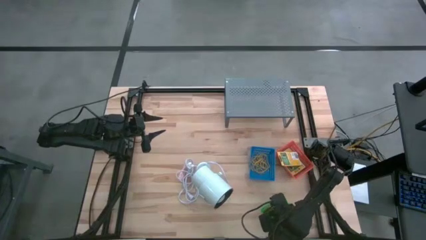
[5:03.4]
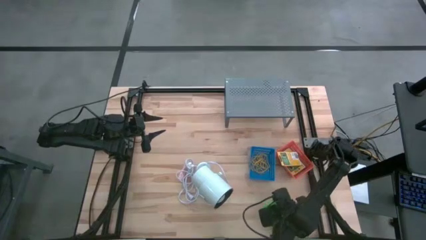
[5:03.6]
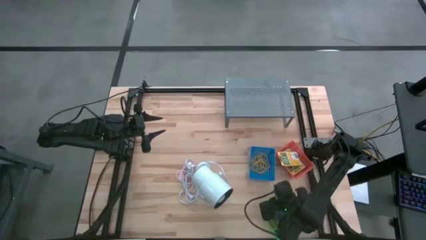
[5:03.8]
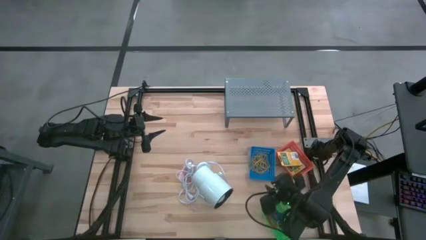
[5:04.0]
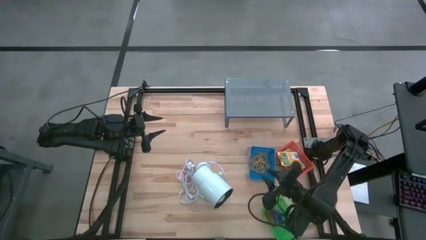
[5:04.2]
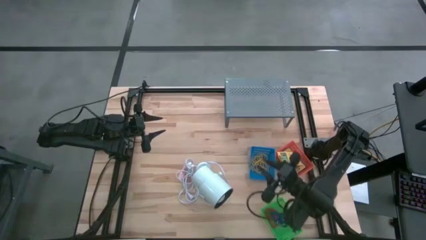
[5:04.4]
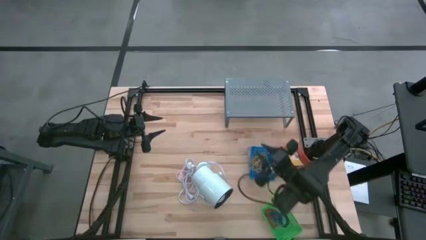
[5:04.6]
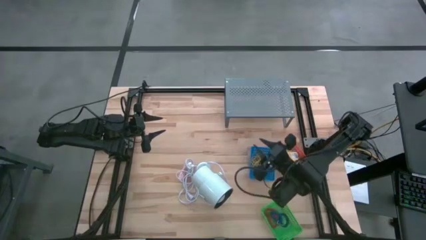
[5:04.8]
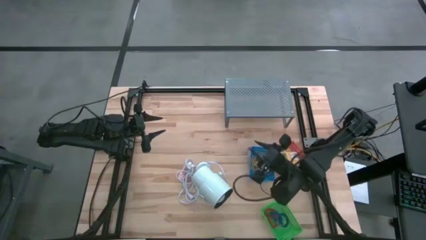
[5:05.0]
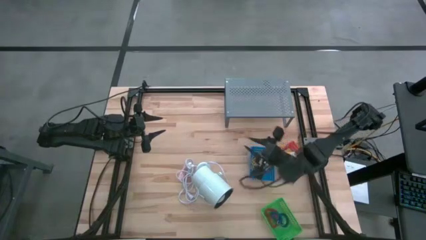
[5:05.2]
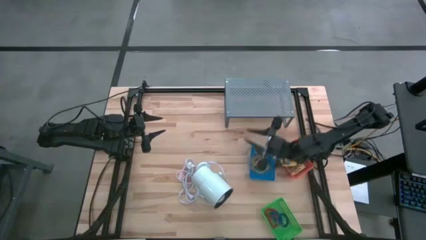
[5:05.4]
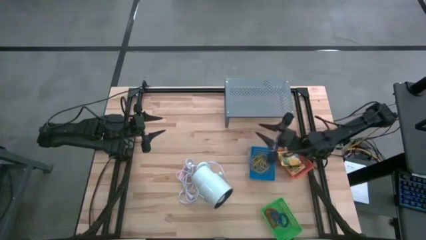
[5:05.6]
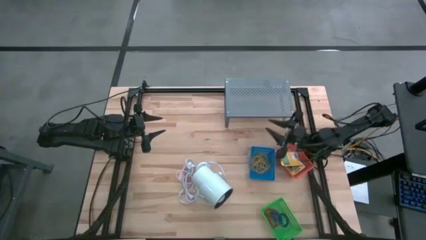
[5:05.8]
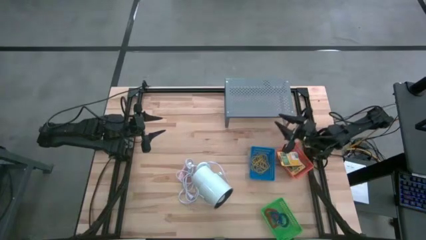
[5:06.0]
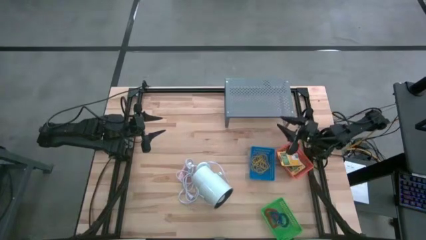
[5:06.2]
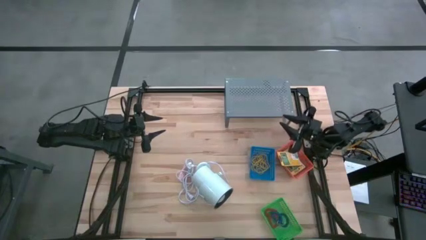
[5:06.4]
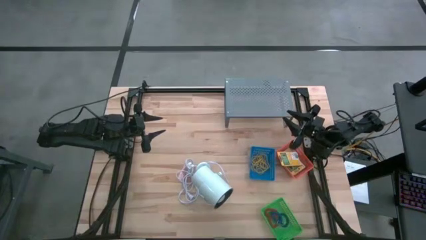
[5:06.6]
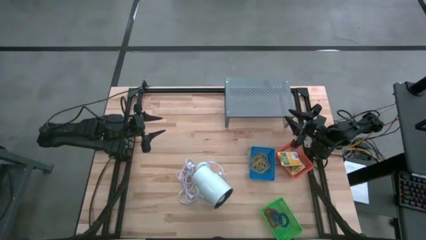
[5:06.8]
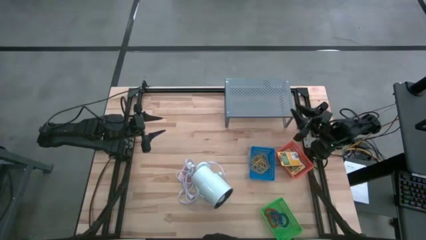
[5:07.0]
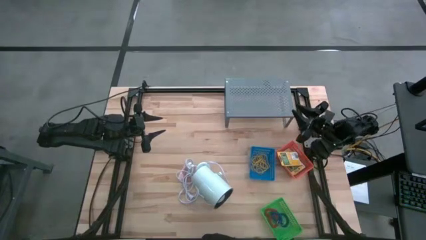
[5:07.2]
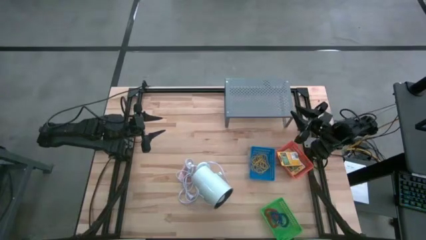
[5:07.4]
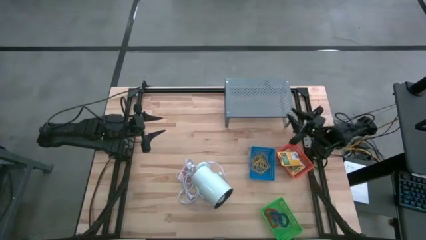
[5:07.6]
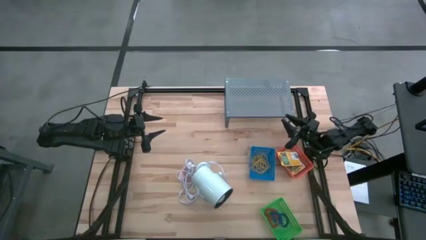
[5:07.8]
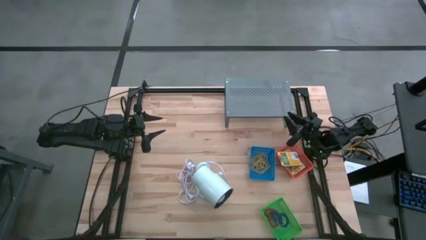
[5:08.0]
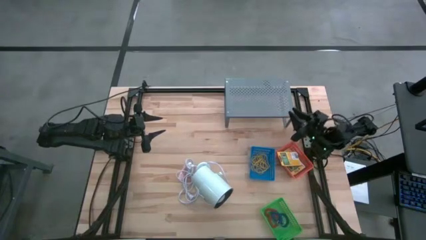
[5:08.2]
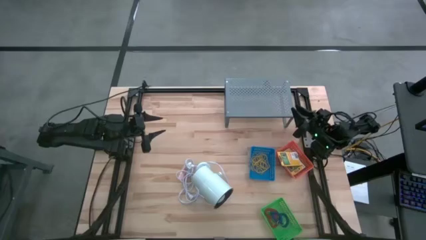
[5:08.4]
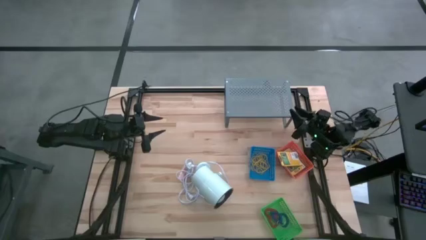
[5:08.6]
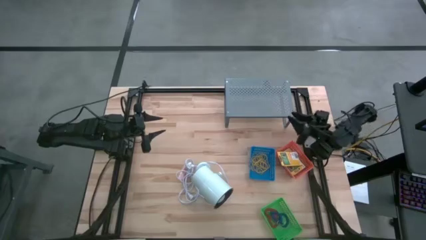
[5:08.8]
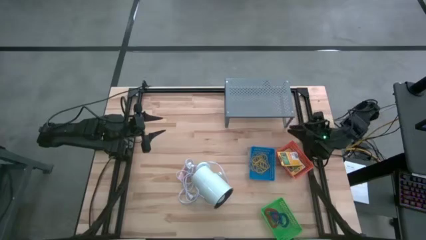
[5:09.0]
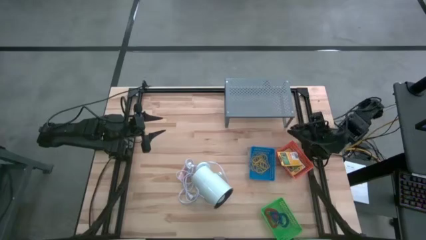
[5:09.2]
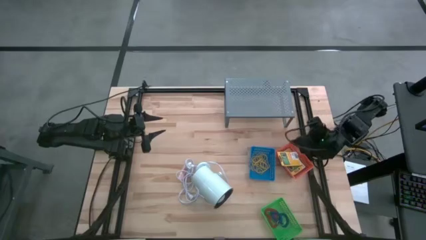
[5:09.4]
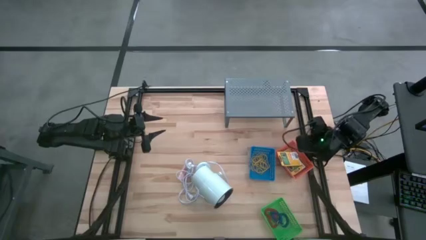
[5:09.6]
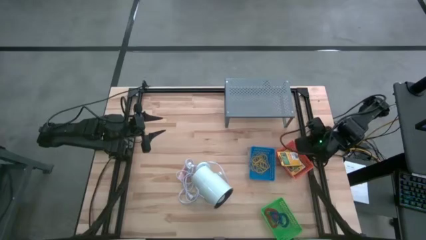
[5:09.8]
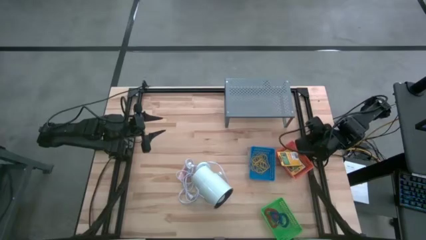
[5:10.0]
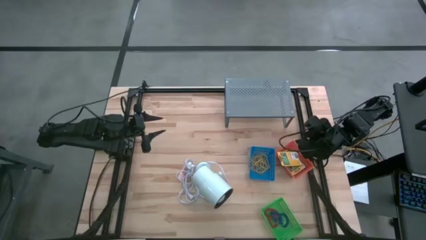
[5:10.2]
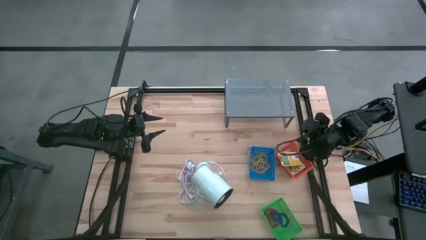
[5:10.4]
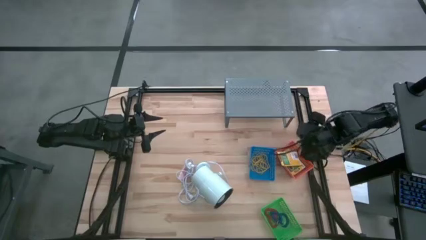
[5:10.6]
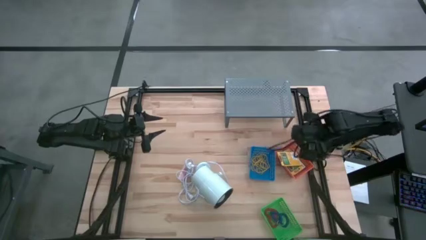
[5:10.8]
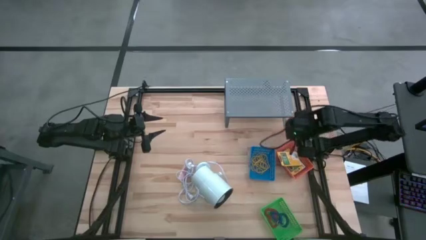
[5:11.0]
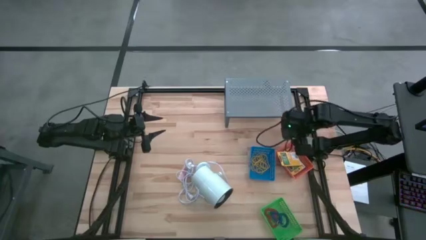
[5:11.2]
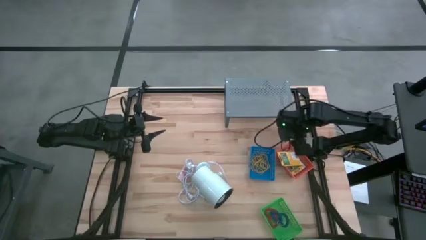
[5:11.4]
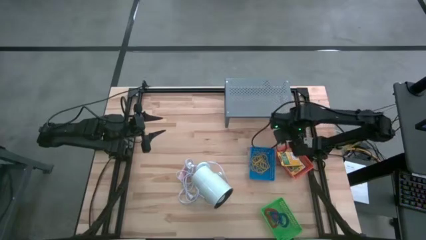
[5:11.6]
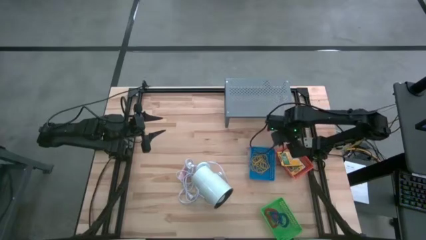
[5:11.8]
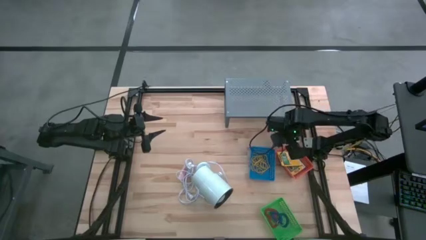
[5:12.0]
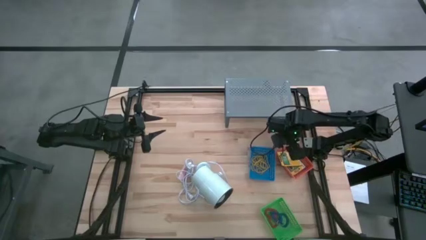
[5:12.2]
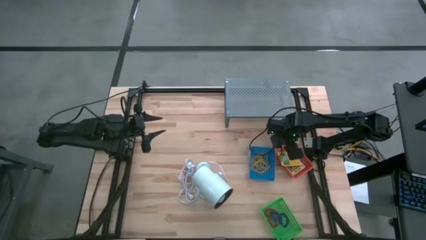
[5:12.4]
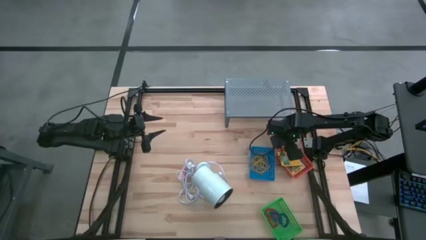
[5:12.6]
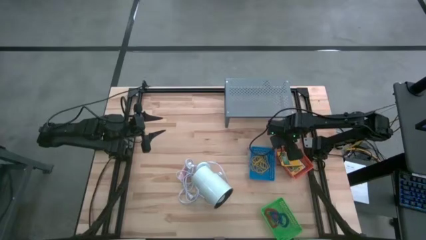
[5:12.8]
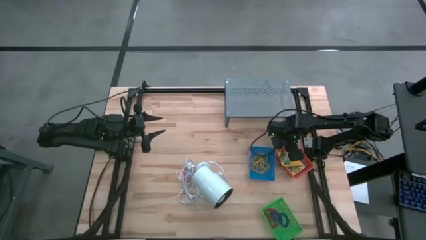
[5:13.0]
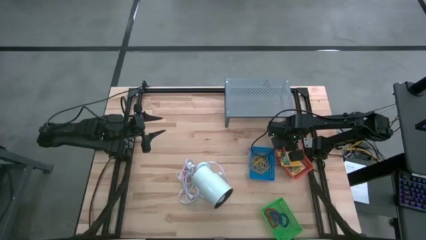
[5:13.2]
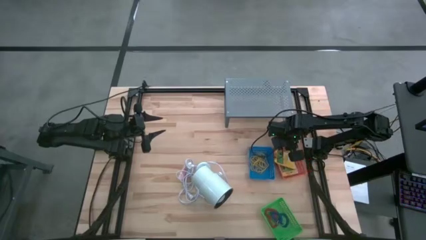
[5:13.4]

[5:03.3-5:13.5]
Task: Pick & Place Office Desk Supplies
Put the orange bin with the sorted box of crayons on the shelf

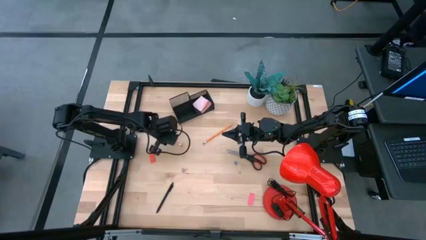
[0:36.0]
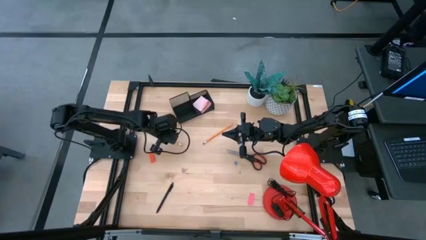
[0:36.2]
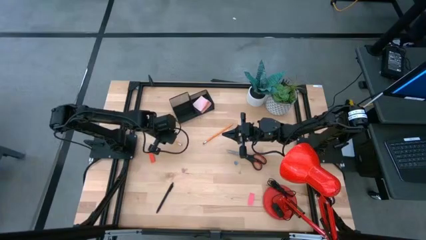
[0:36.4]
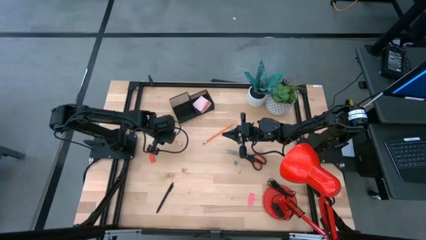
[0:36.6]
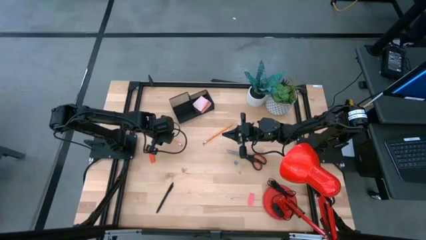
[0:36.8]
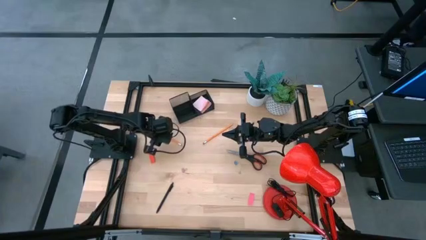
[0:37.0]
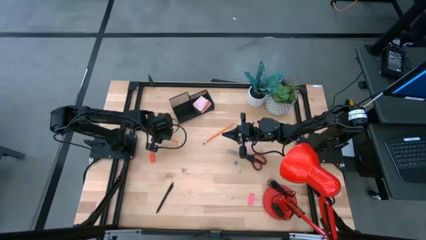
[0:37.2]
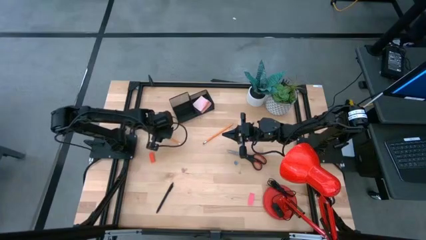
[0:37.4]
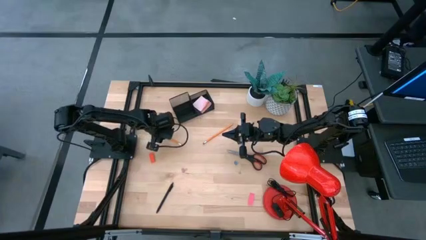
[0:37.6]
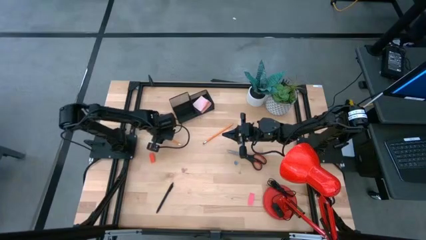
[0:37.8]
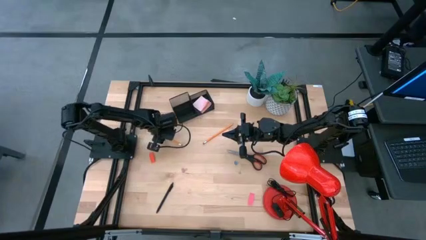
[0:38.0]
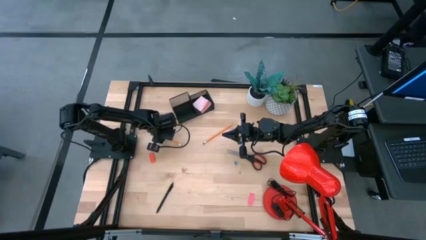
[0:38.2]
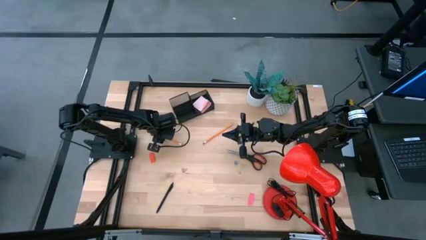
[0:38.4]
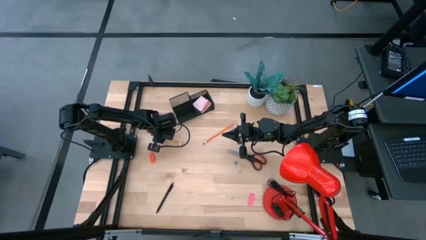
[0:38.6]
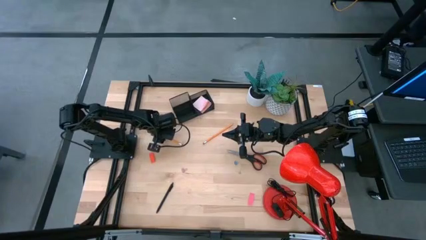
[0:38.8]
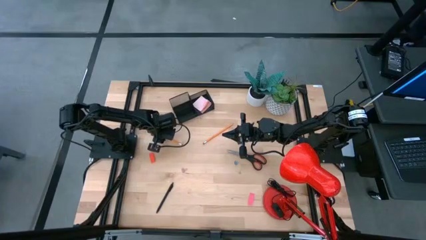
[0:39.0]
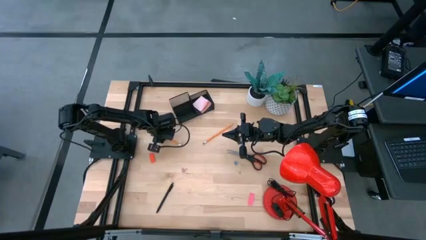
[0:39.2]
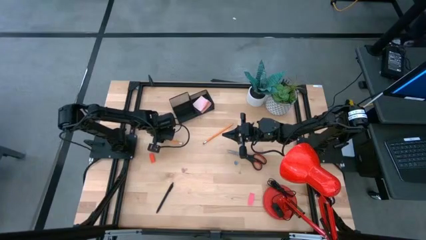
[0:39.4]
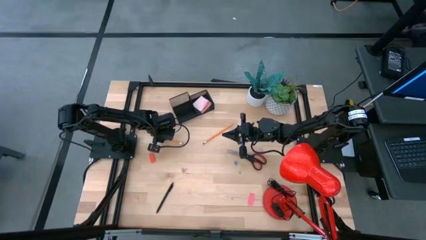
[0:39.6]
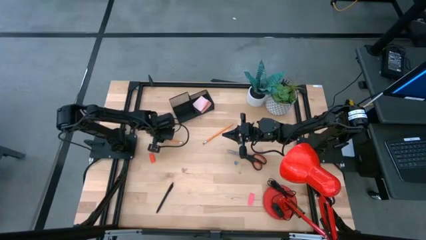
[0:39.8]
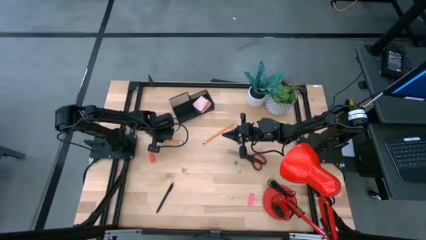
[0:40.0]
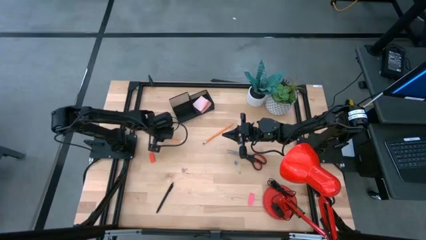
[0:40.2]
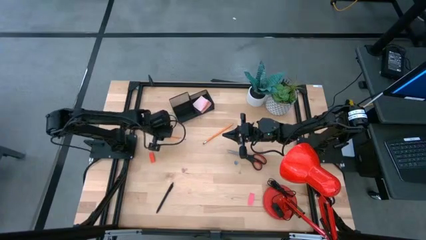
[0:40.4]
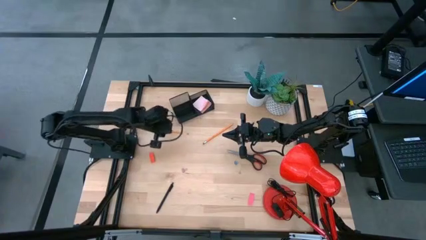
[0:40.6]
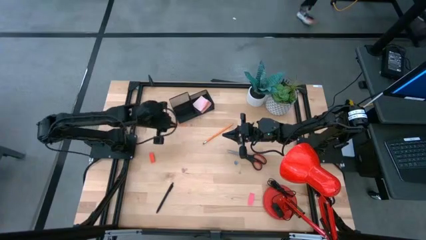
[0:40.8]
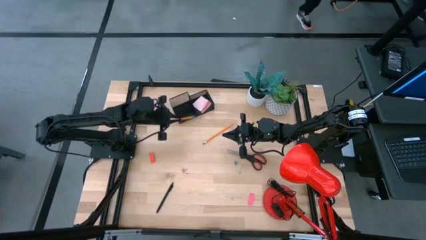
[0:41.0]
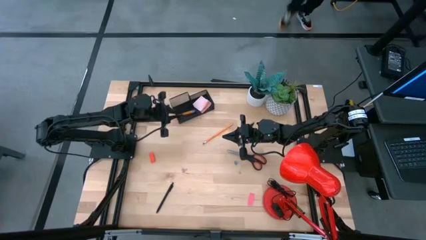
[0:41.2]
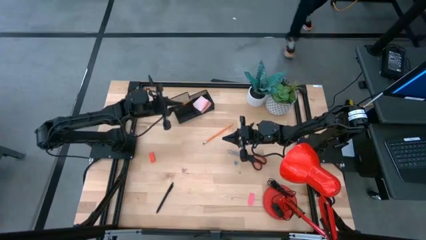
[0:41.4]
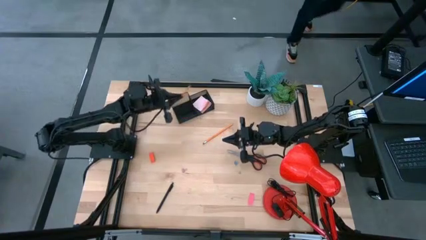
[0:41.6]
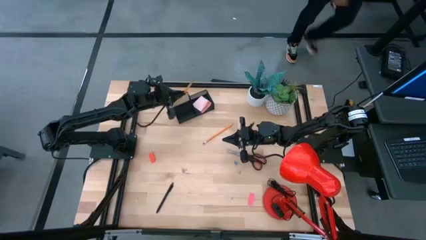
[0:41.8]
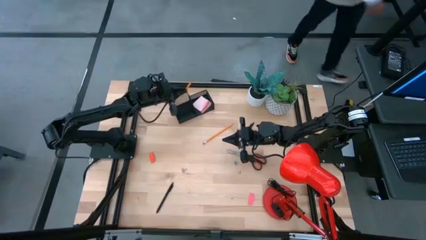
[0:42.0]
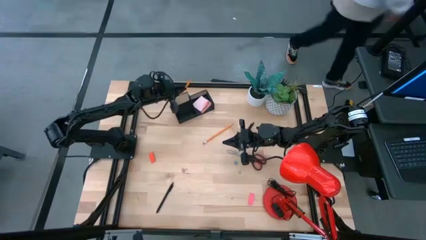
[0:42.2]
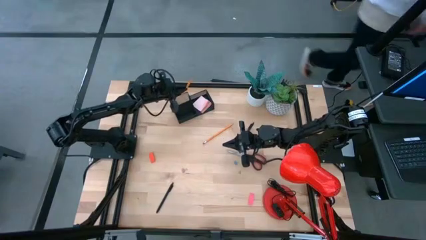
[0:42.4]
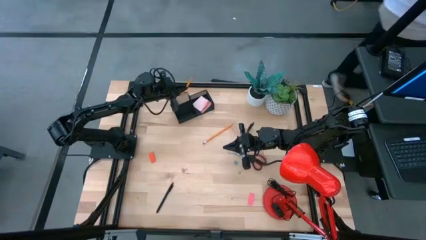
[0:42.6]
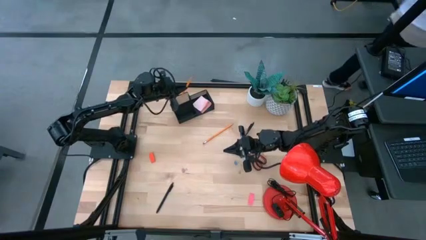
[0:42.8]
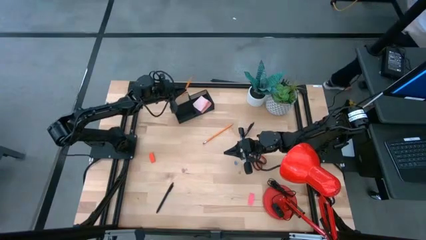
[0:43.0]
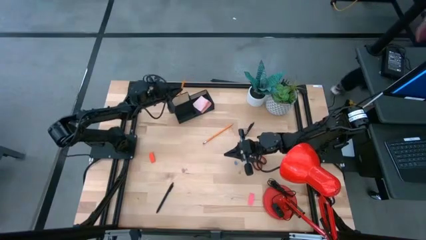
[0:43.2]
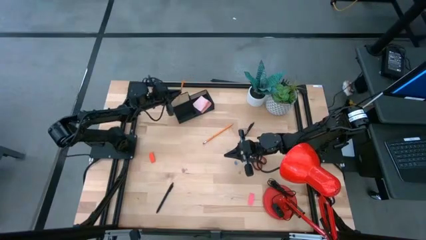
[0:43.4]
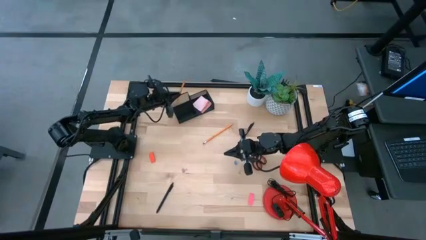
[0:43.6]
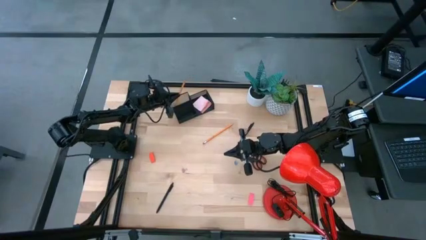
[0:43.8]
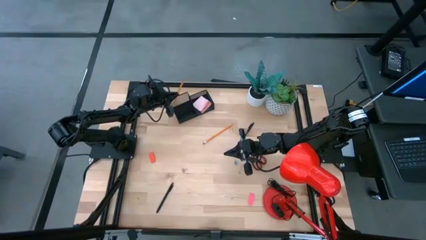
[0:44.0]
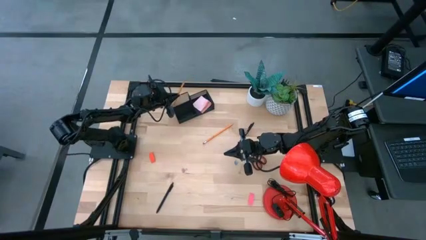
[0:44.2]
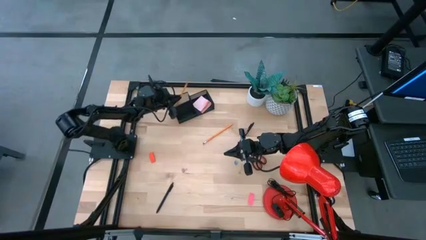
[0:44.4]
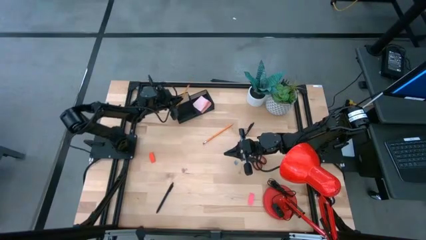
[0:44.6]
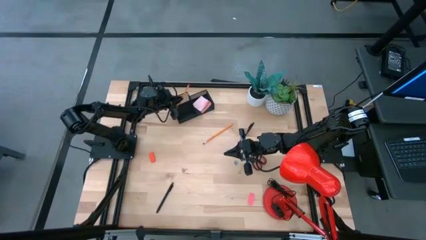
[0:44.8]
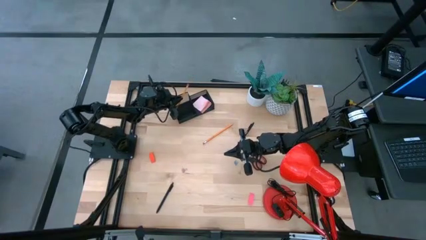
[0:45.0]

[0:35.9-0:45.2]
Task: Pick and place office supplies into organizer
Put the left pencil into the desk organizer
